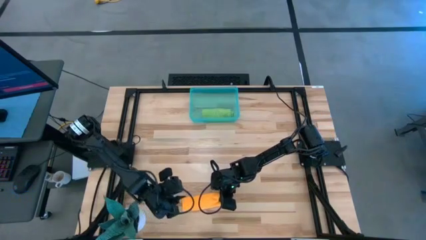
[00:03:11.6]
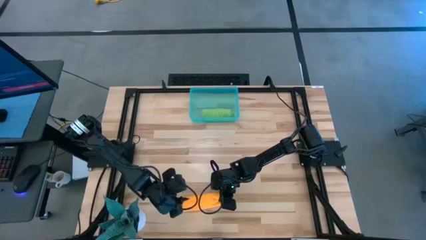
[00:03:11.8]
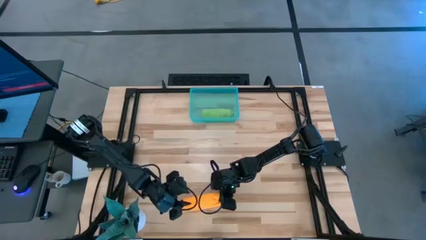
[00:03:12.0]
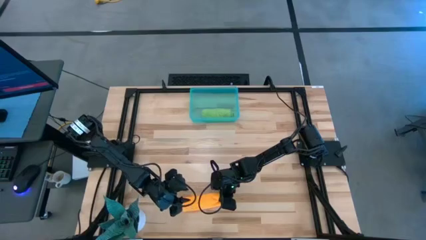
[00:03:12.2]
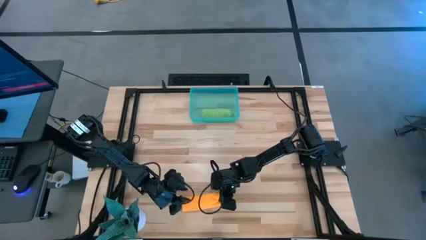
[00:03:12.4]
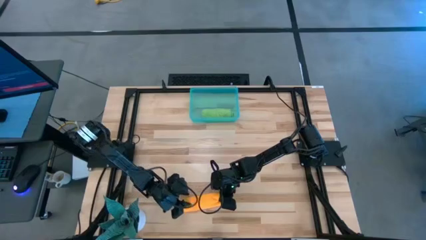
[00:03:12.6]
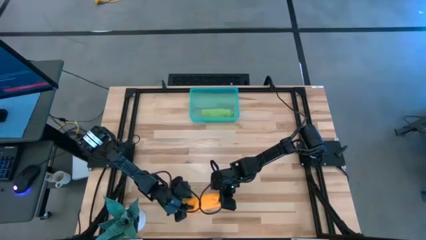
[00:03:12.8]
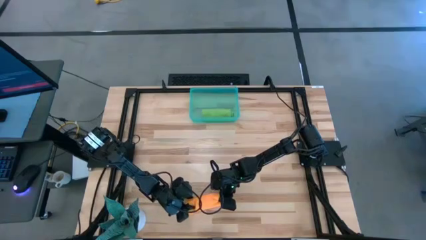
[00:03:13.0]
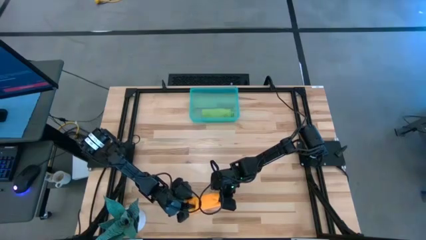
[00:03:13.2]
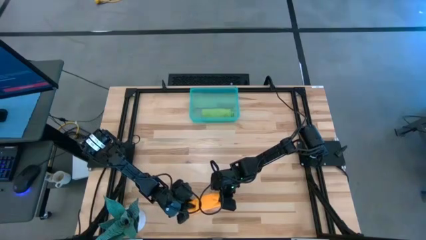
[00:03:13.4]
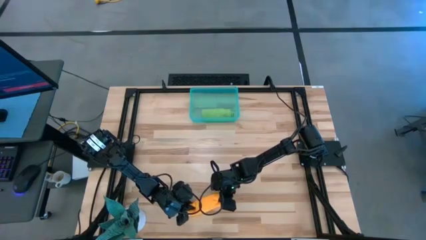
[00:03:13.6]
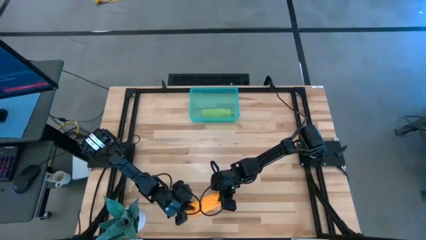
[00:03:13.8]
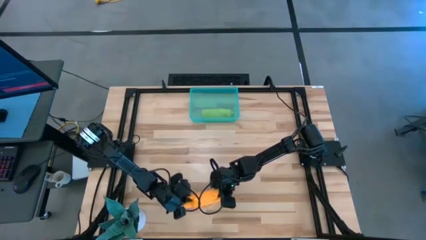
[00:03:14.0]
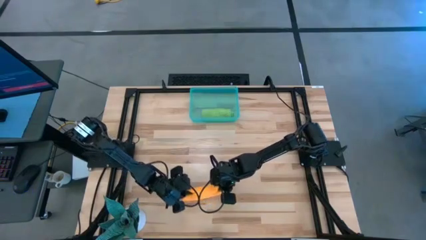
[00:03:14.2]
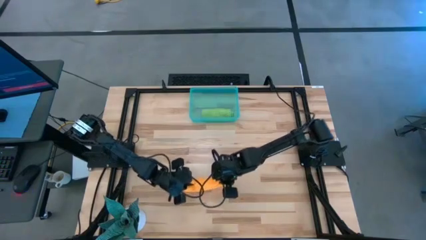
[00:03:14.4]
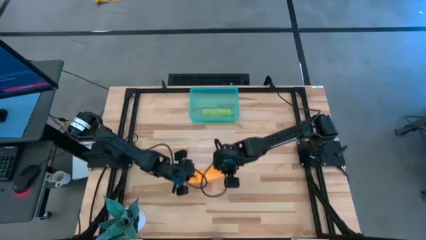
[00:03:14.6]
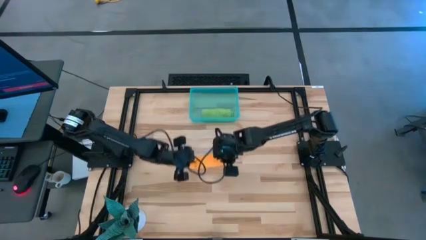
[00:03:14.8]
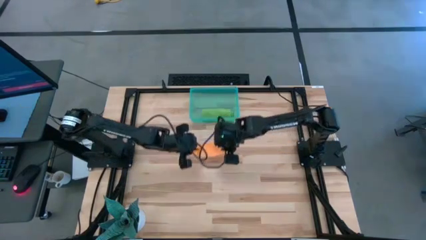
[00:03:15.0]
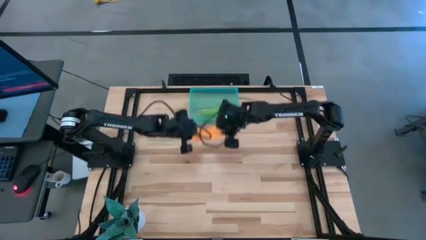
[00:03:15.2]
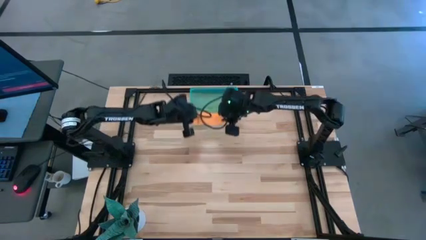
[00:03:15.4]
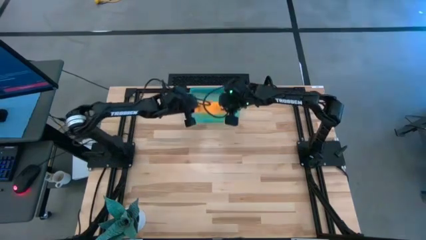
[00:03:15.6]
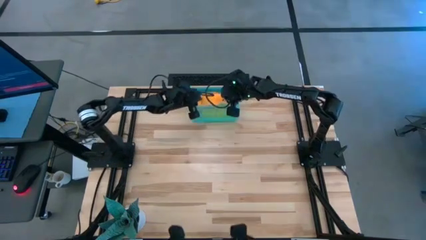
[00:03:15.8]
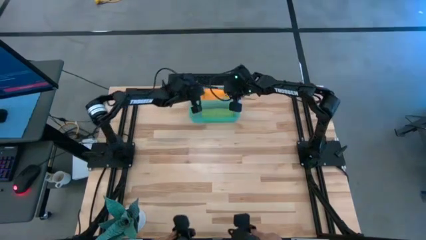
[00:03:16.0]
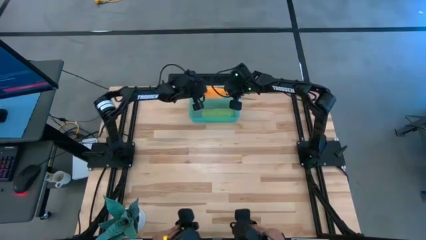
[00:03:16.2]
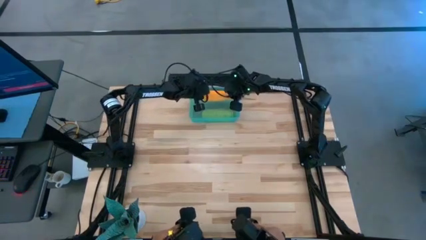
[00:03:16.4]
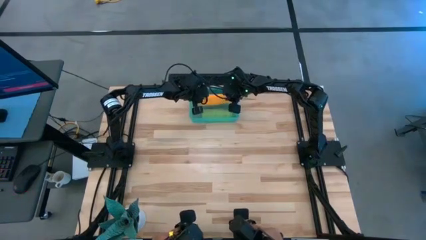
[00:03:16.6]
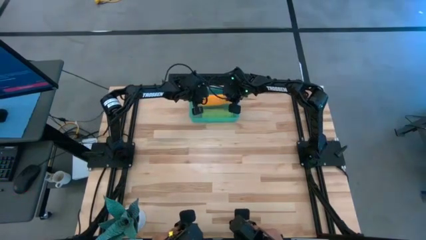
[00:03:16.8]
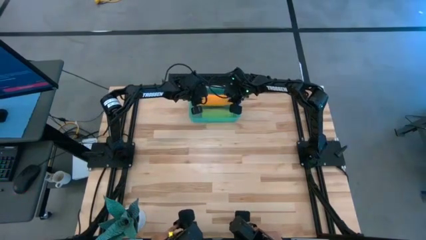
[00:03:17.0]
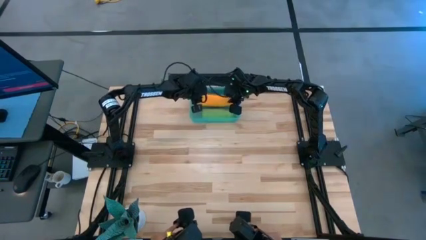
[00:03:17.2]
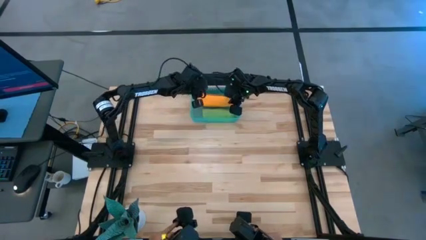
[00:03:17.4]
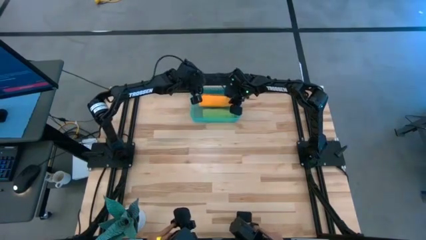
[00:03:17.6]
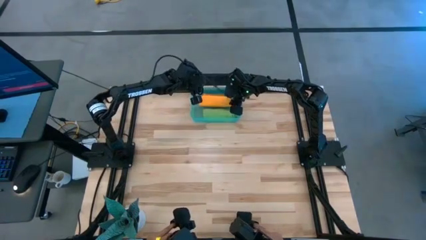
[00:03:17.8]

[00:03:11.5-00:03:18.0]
Task: Roll microfiber towels into tight, uniform cylinder then place into a basket
Put the orange towel into the green bin

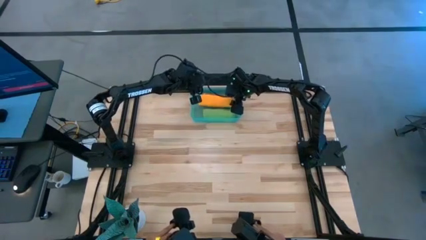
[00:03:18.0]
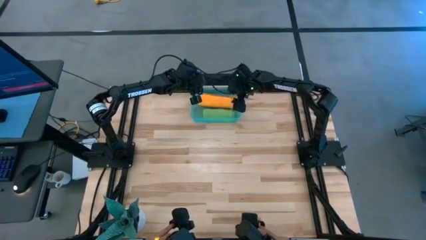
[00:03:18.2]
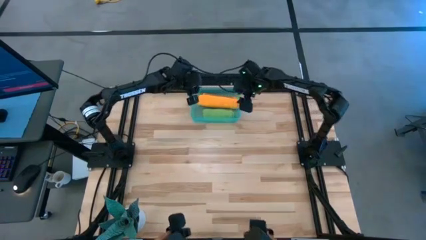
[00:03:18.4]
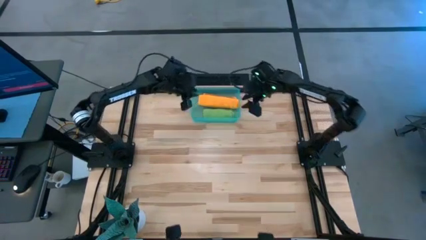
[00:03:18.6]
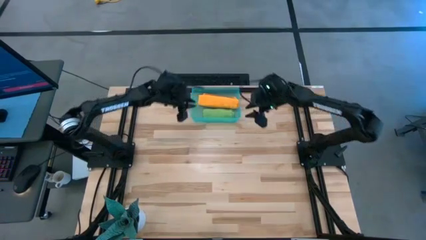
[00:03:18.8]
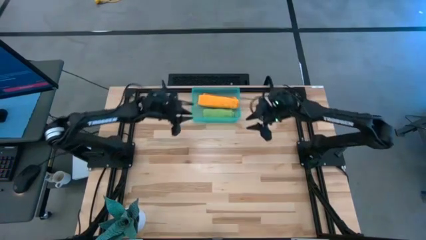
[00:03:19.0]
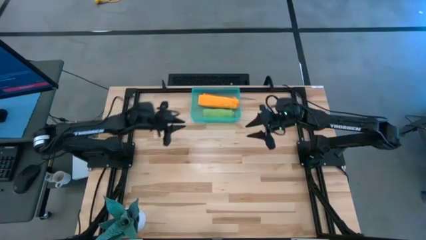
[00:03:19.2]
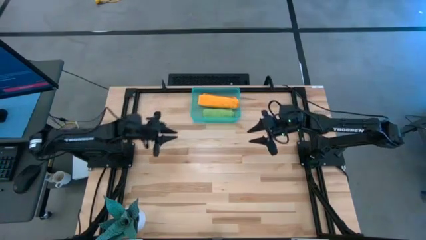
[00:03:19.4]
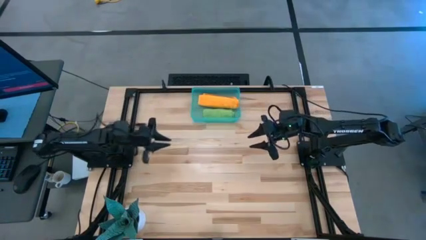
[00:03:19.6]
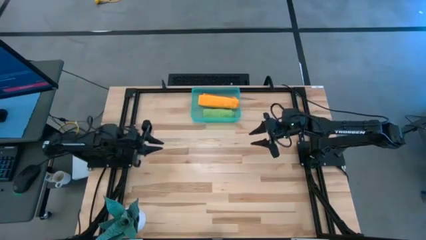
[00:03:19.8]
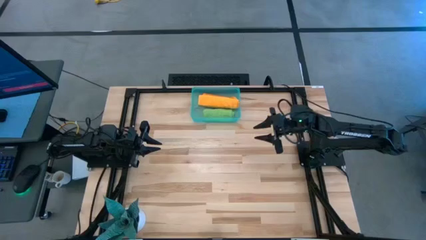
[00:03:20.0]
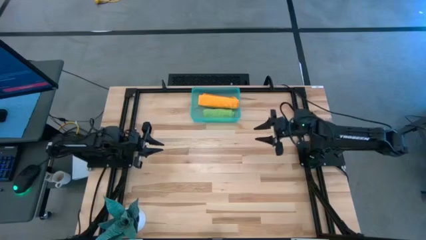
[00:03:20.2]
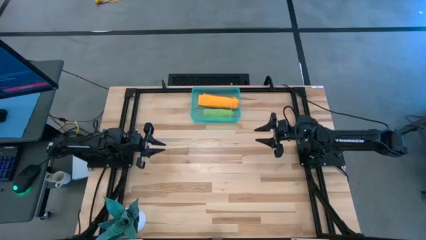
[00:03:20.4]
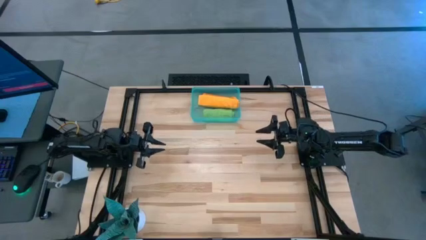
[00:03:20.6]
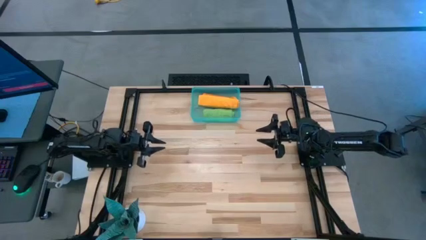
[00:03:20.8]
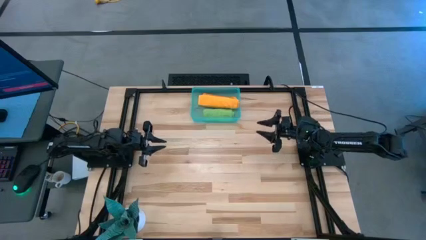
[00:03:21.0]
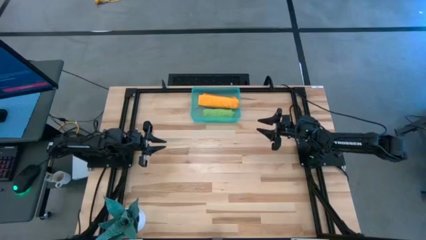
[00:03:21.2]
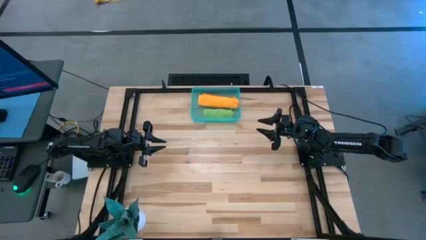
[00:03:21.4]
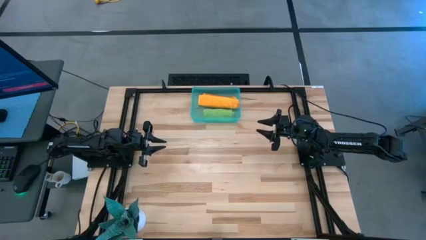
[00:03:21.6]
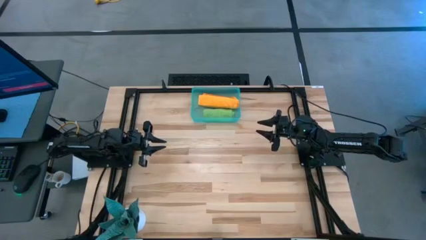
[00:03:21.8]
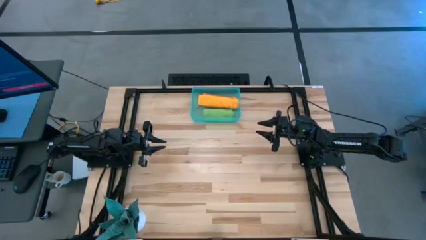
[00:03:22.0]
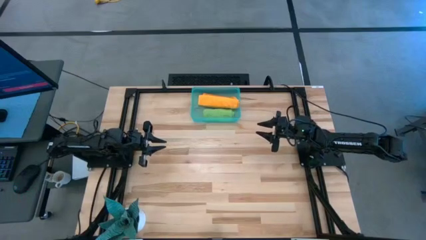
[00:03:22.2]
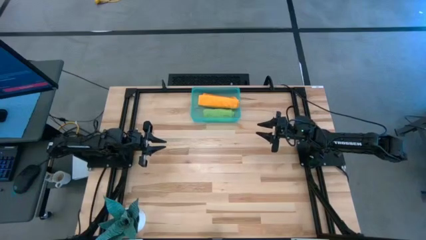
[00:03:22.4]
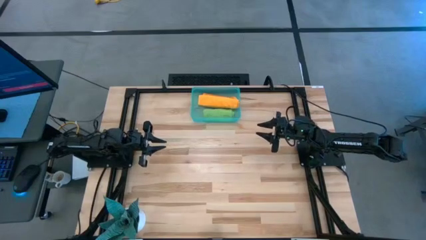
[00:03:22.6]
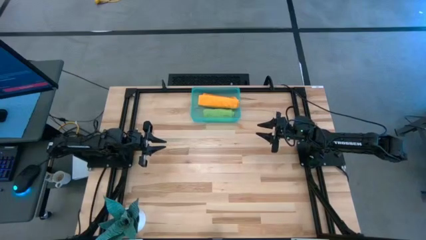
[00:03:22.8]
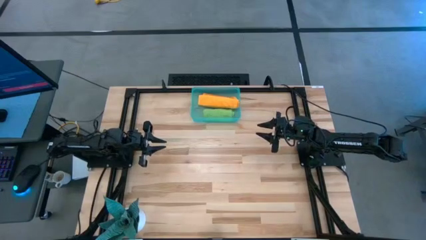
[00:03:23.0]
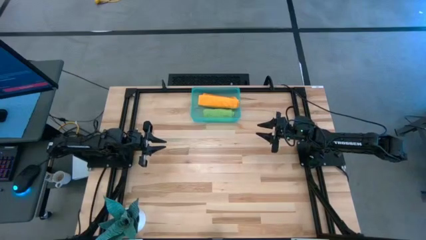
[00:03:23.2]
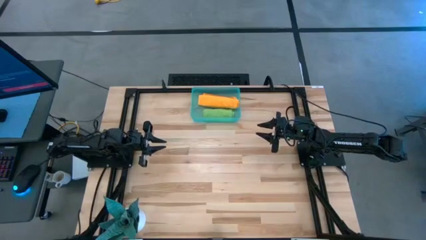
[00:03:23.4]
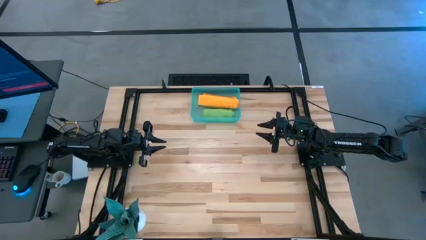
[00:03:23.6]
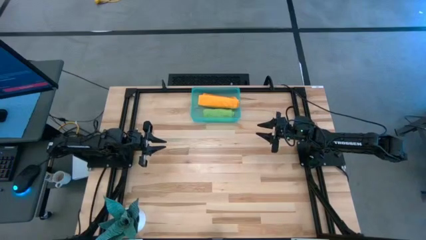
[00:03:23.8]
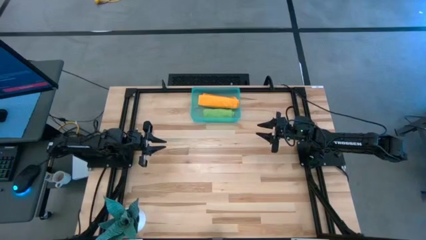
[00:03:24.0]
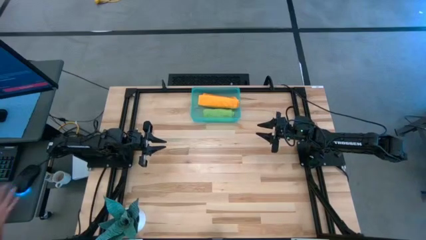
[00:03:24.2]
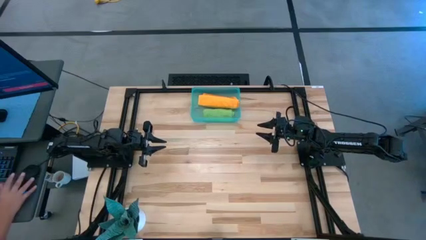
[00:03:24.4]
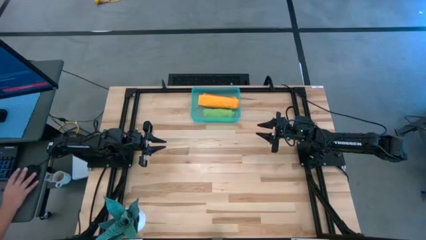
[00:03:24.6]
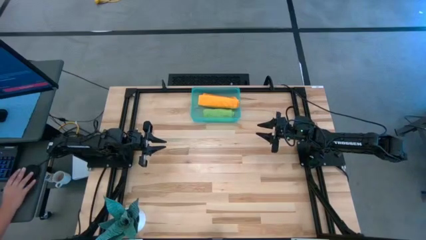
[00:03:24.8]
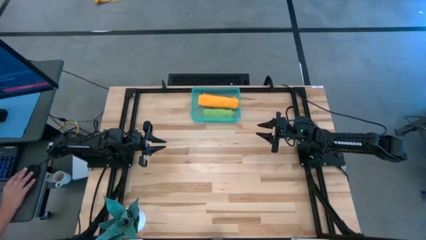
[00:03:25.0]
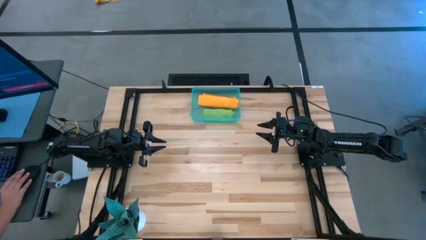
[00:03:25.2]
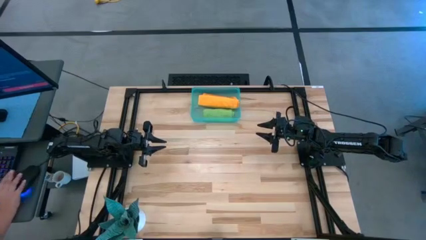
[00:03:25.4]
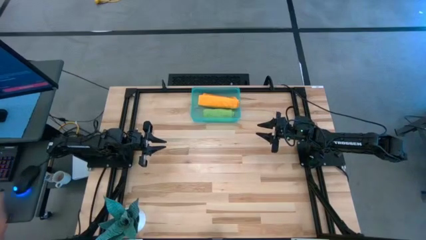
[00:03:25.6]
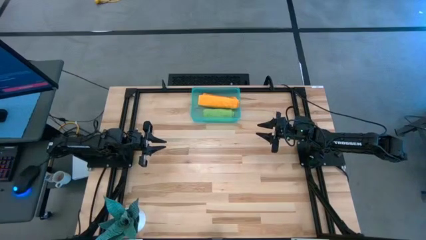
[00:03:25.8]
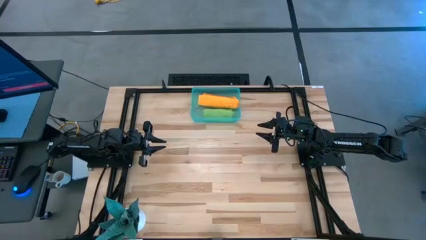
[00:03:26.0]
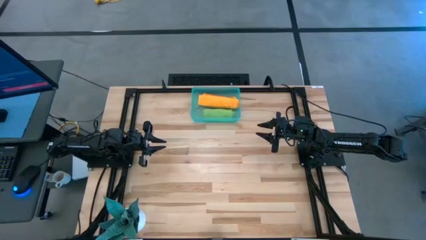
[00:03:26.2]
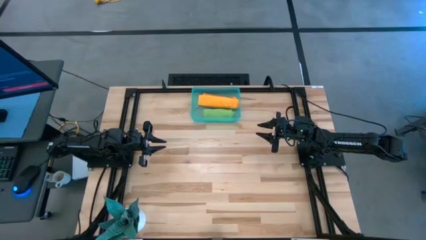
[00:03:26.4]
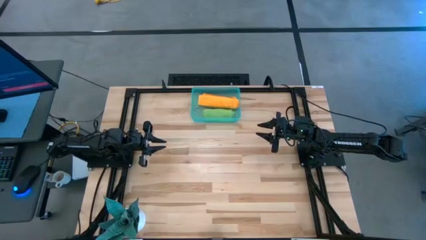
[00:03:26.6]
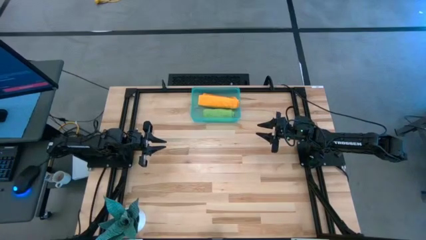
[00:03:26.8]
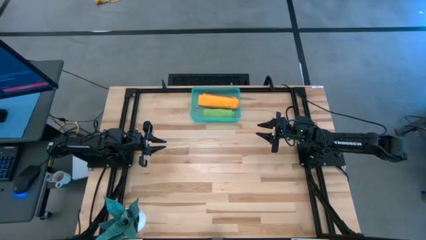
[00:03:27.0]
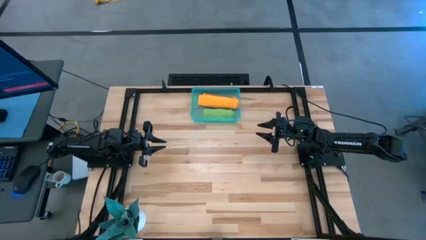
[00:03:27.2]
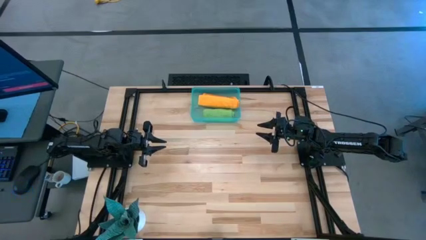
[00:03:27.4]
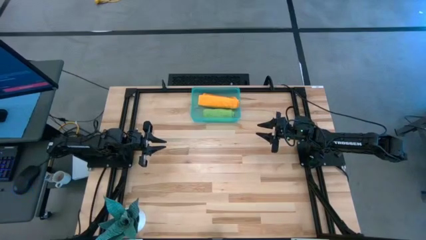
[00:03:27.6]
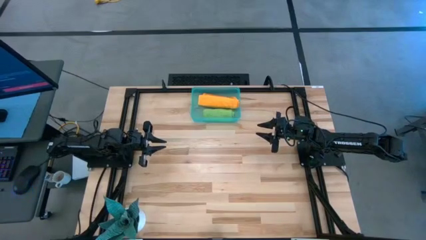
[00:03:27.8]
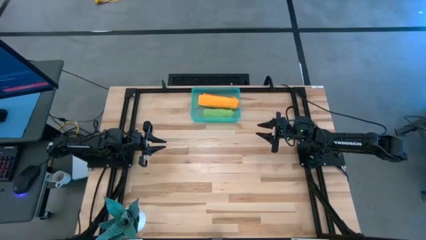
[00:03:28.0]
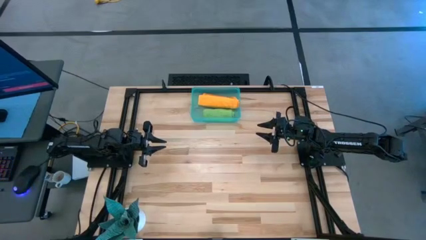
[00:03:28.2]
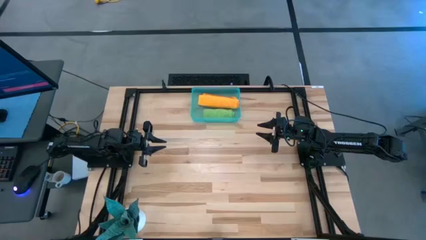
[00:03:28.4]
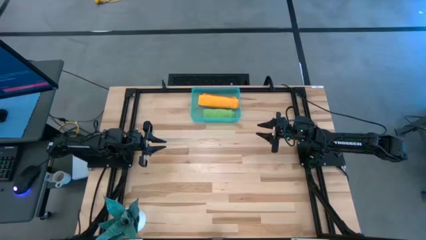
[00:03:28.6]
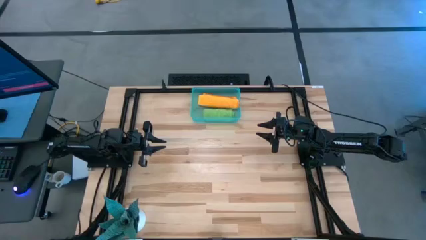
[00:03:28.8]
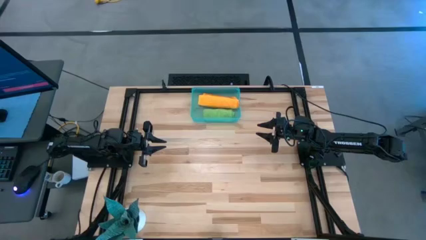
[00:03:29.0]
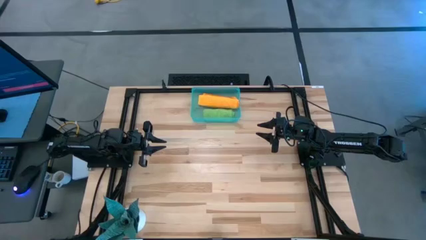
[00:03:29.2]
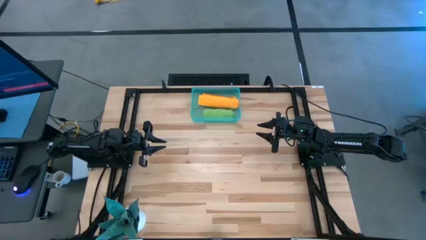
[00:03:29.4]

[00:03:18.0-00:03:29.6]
Return to Home Position
